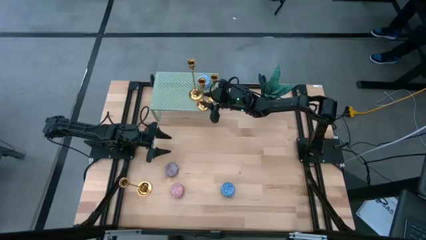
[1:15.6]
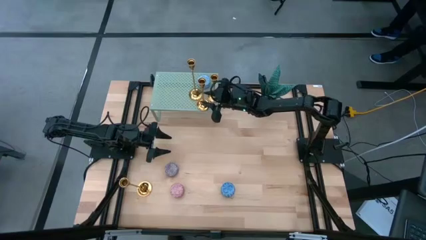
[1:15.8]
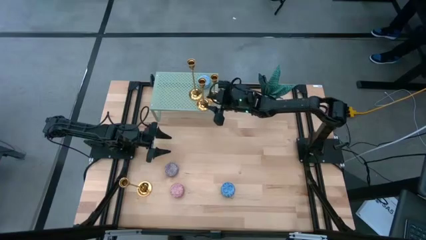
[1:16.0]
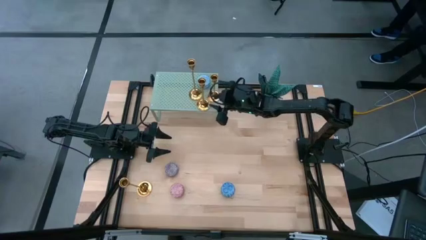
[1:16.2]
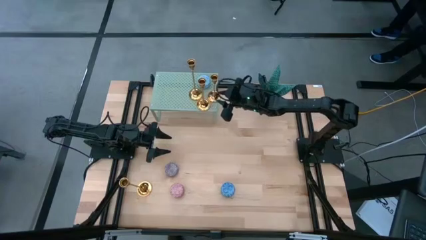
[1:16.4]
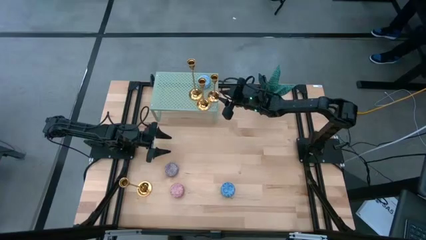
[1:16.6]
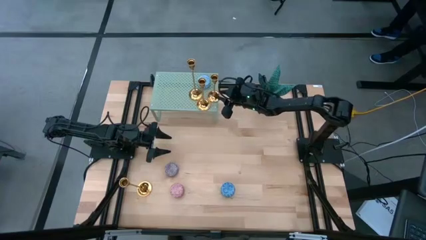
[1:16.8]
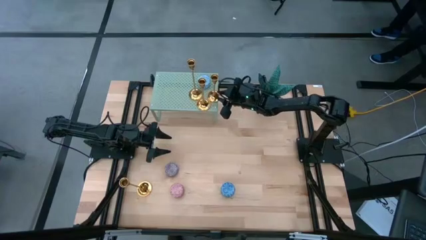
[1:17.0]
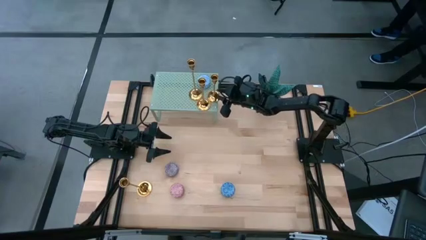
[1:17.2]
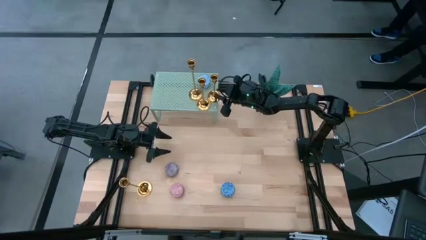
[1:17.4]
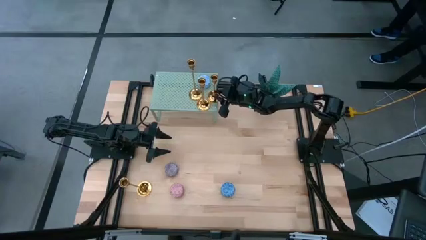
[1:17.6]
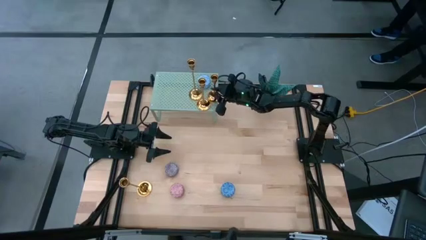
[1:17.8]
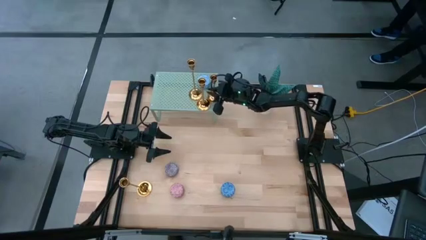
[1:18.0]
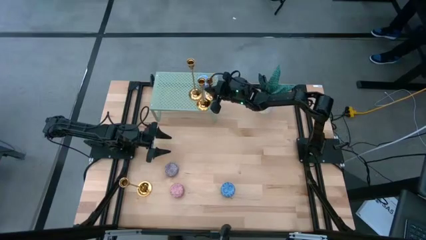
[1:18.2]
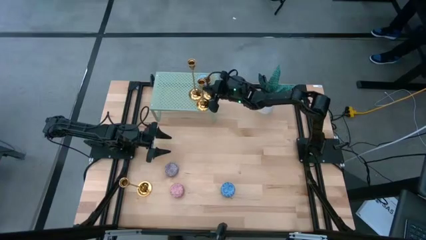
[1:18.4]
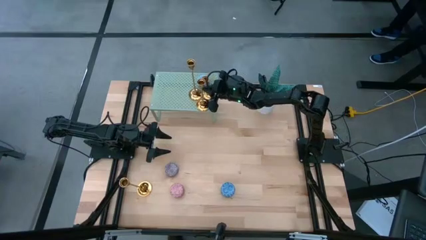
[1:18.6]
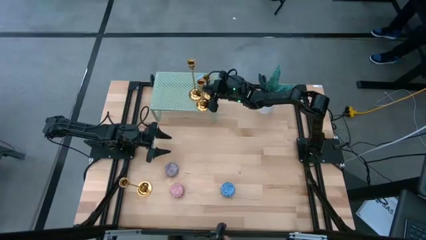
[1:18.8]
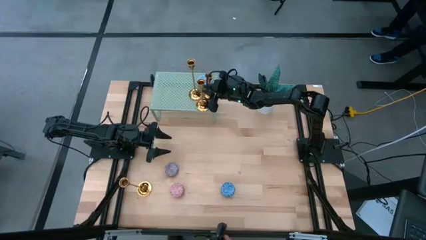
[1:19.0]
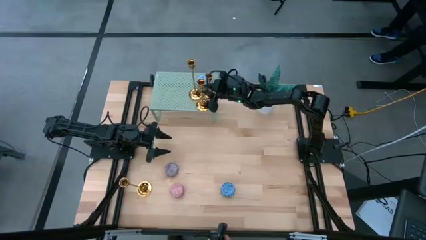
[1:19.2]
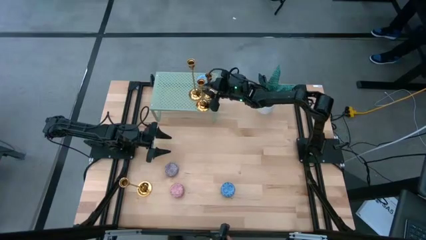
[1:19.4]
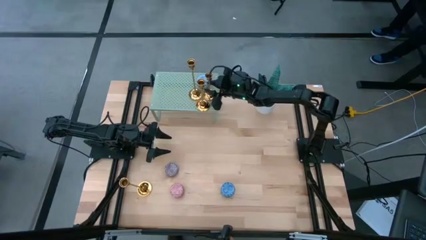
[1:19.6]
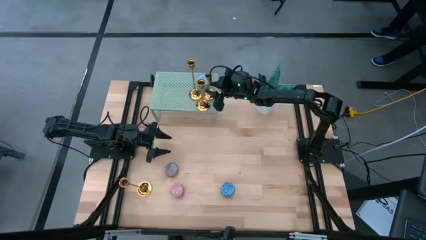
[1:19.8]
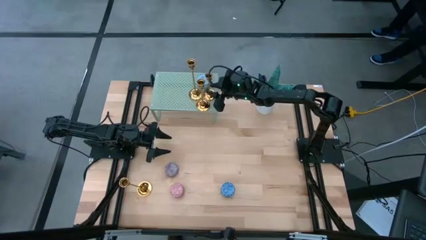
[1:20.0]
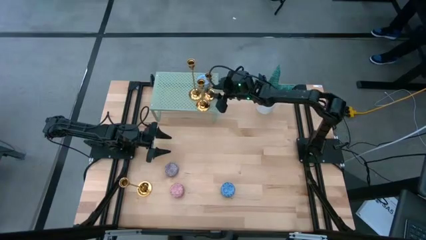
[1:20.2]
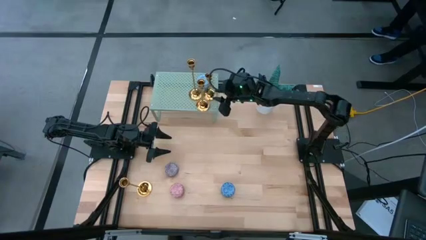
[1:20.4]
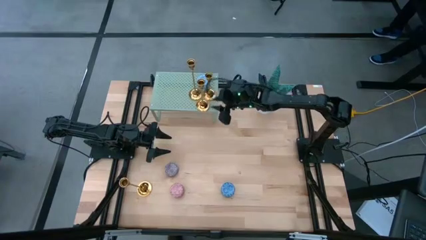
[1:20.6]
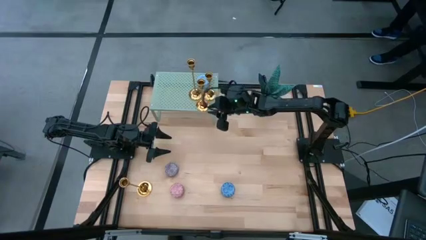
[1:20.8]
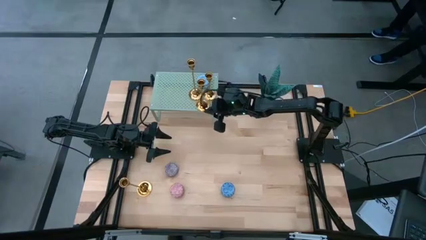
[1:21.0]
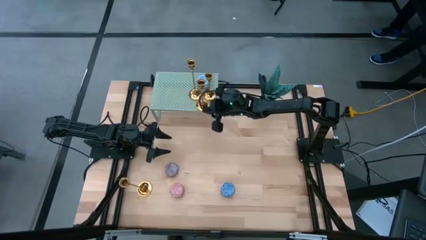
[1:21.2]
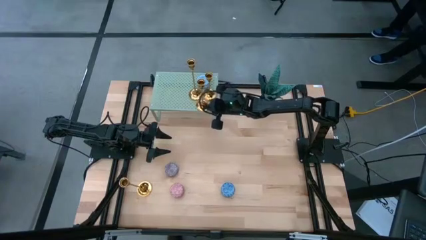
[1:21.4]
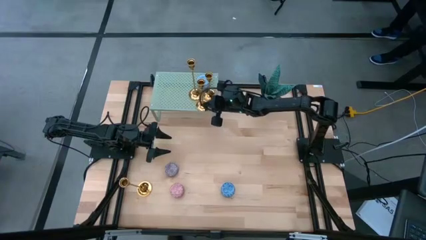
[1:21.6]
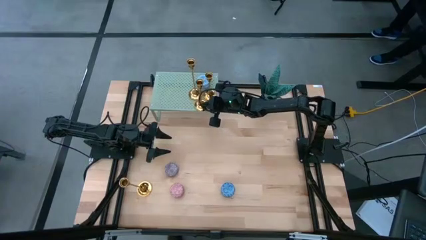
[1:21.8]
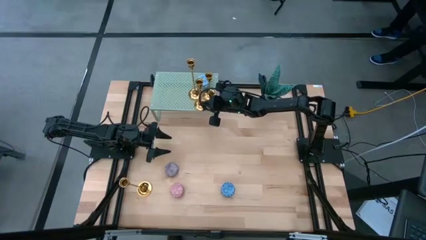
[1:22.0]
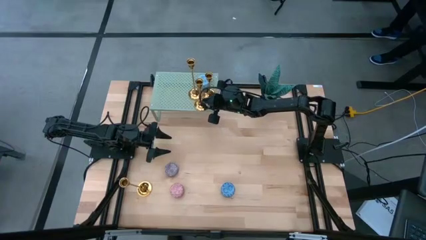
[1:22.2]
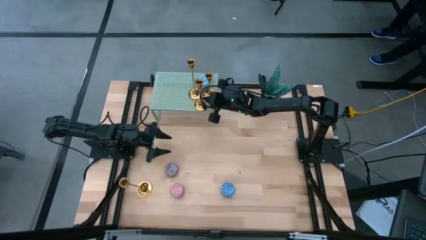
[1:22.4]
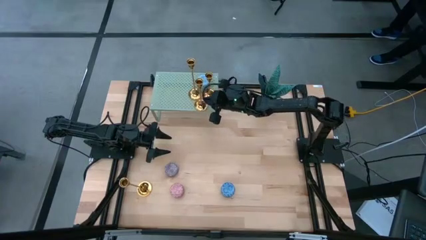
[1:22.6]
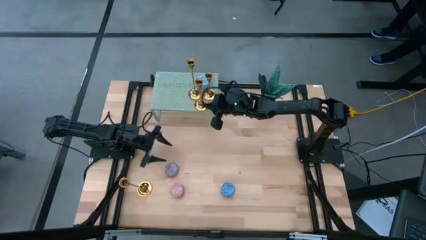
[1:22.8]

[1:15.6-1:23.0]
Task: Pick & Place candle stick holders
Adjust the gold candle holders on the shelf

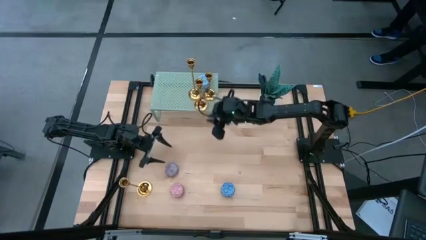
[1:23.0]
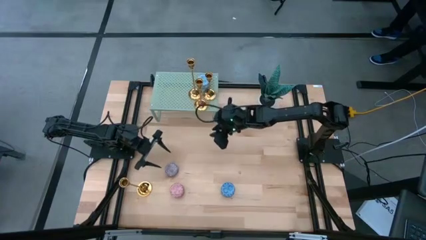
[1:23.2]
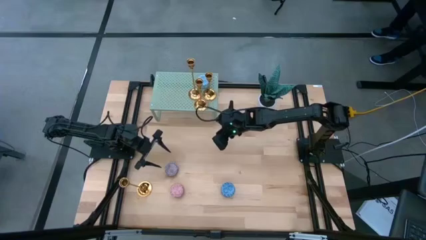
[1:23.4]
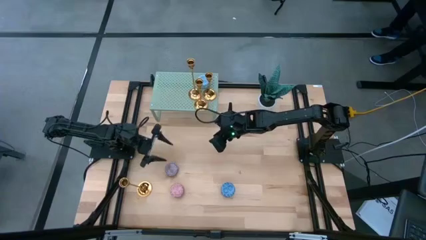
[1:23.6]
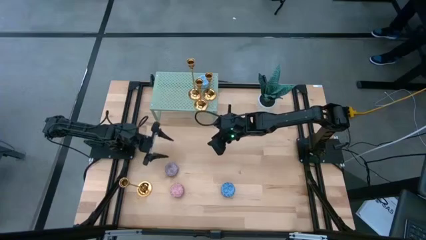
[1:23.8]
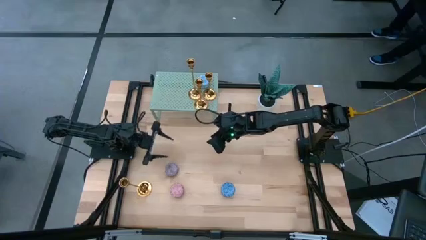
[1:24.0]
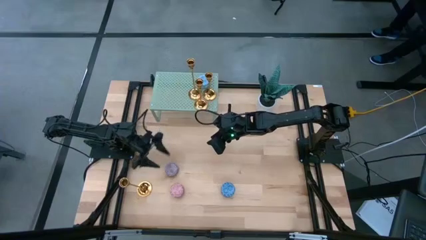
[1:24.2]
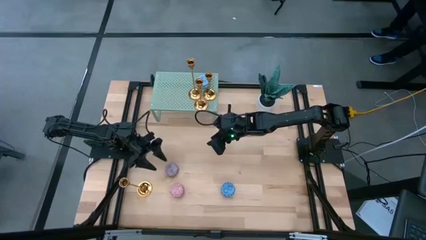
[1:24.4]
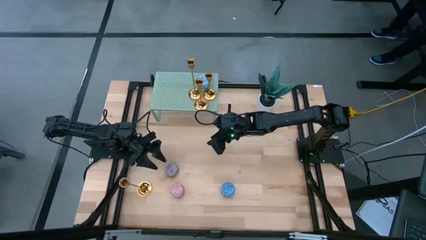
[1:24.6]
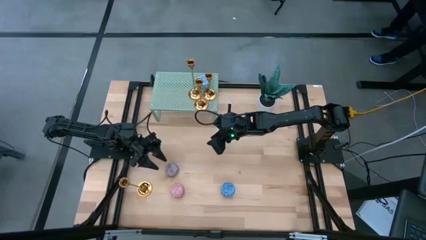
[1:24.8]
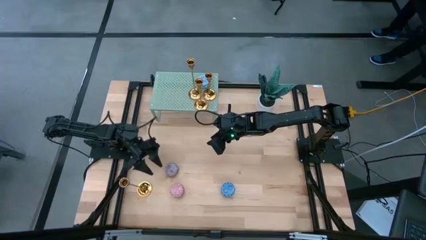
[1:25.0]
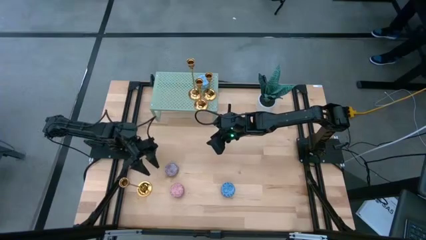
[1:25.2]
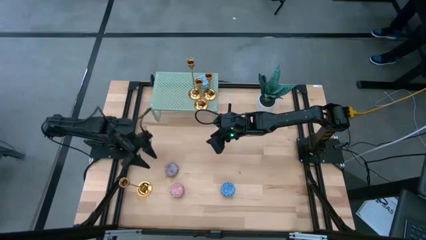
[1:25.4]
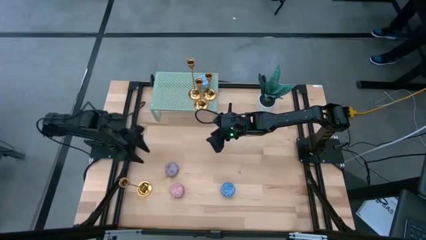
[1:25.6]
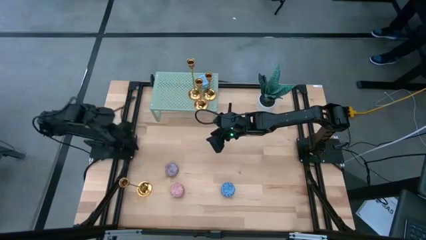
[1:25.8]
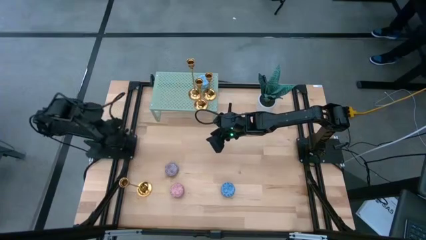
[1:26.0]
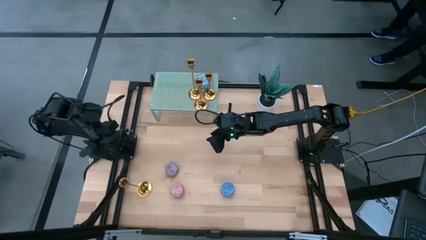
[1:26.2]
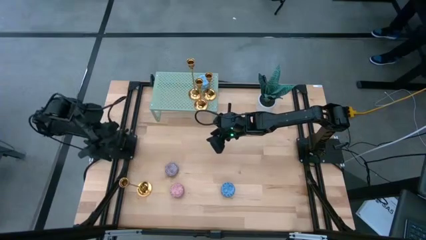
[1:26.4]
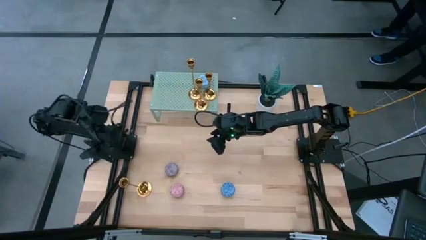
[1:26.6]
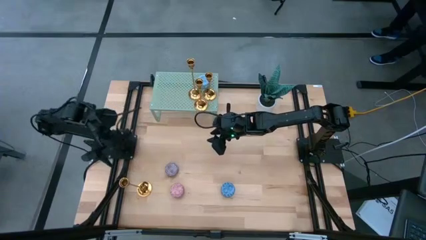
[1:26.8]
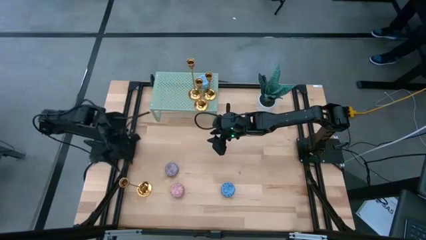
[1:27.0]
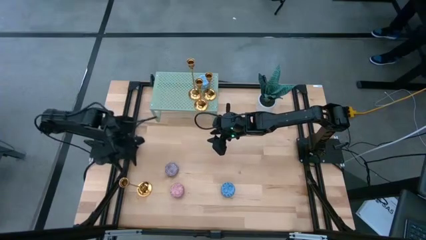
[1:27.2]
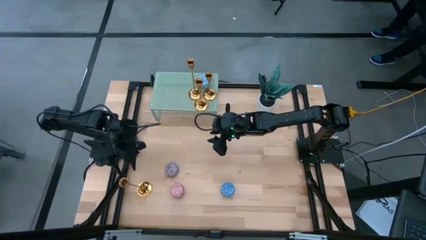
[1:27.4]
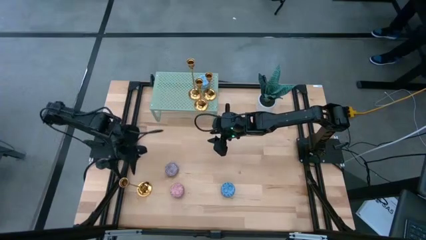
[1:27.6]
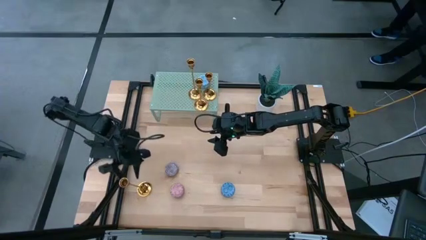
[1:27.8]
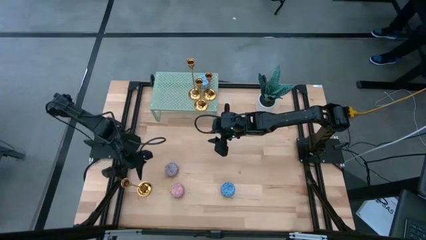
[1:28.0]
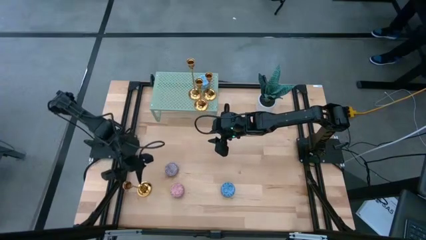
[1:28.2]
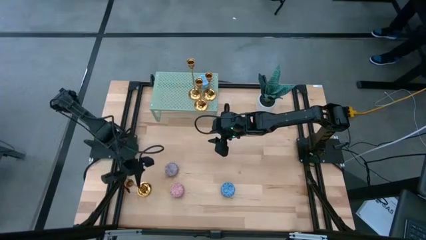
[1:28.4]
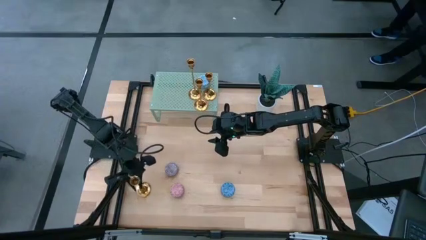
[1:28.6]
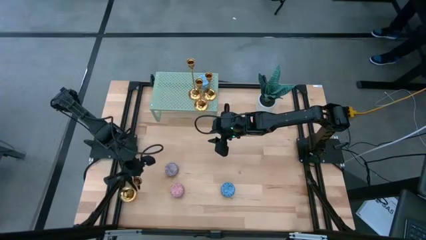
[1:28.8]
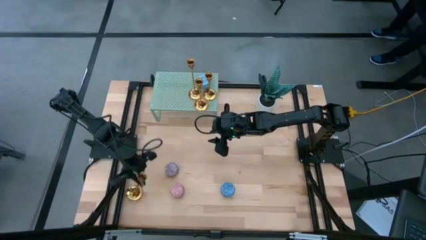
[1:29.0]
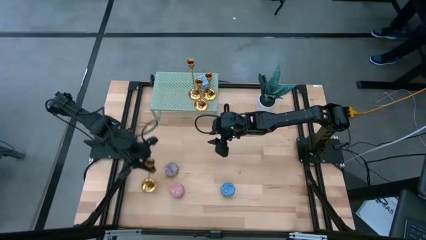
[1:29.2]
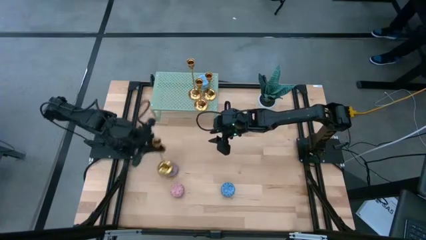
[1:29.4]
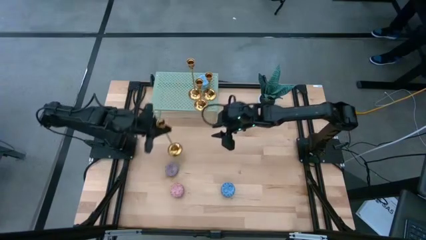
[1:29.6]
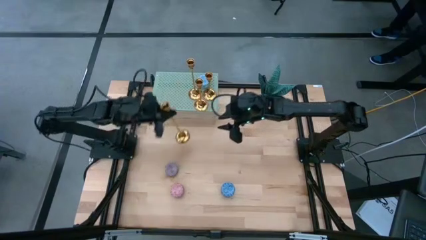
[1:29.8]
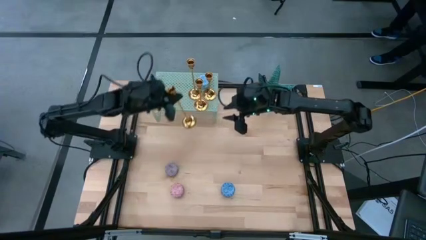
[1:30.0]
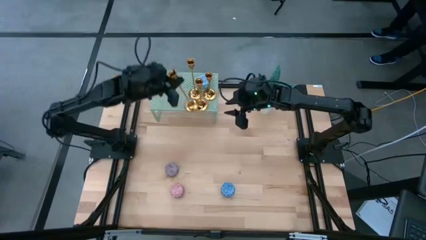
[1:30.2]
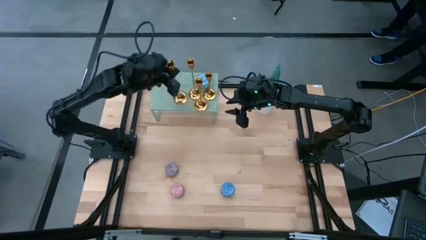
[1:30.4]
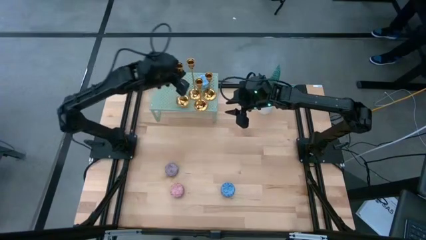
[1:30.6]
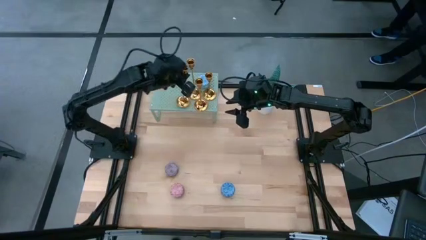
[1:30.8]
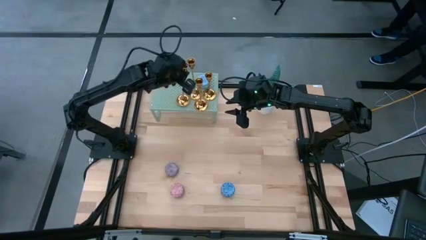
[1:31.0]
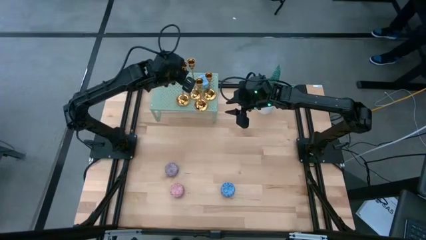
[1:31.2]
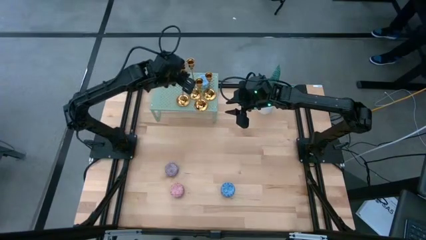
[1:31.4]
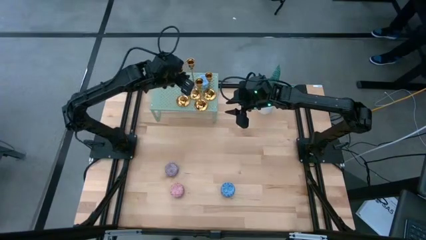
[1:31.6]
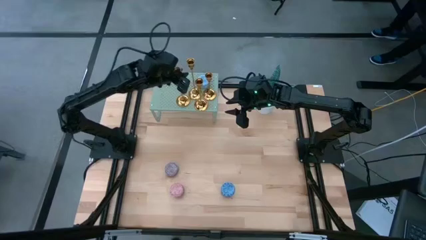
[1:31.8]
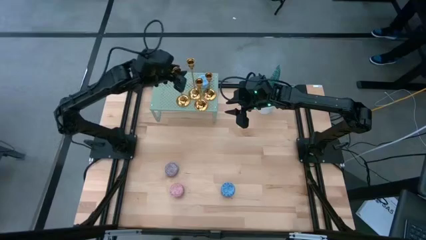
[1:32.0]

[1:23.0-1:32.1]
Put the gold candle holder on the shelf
